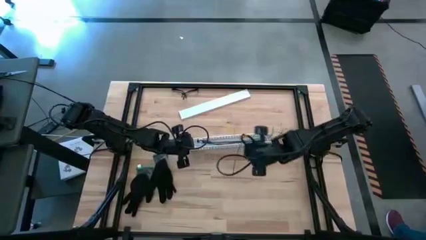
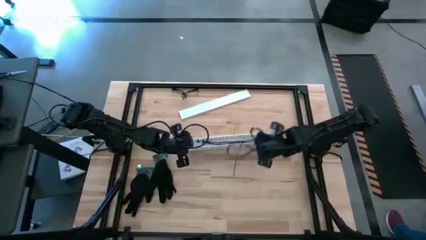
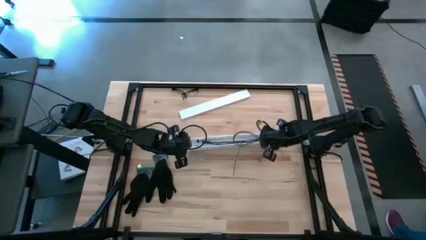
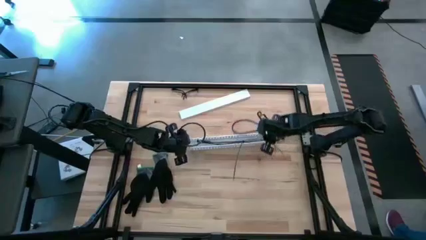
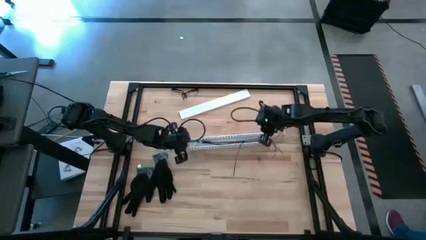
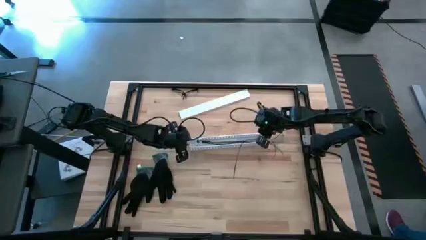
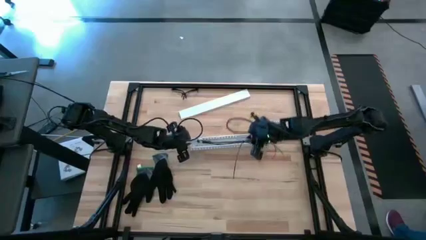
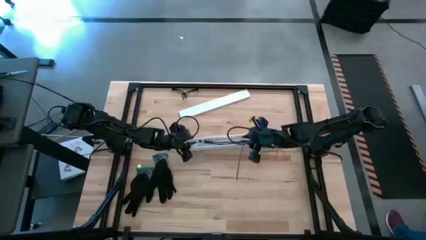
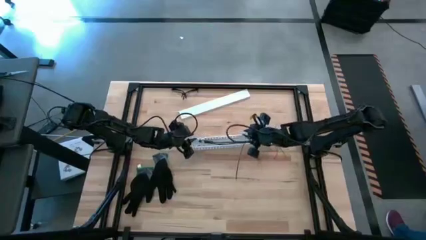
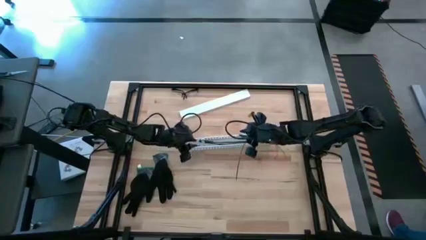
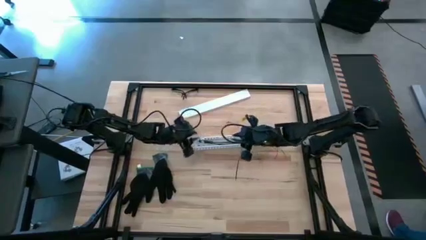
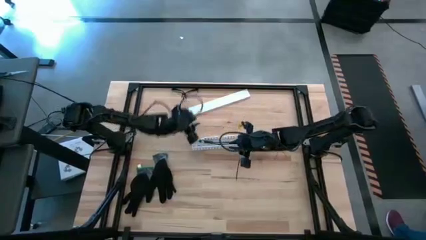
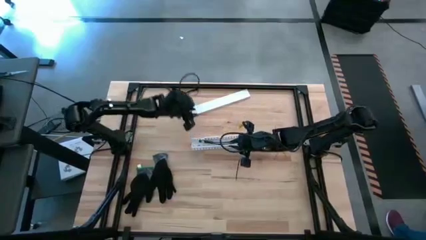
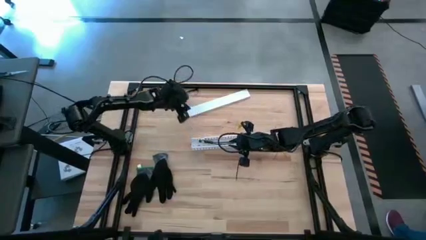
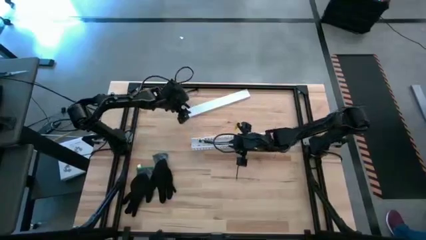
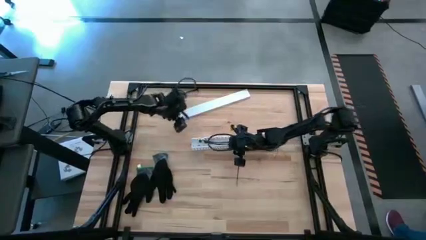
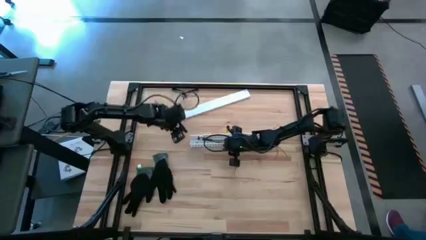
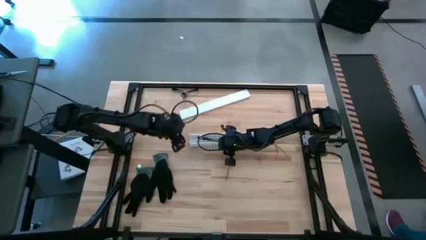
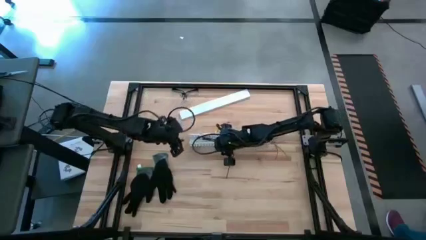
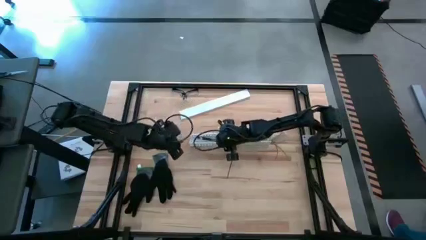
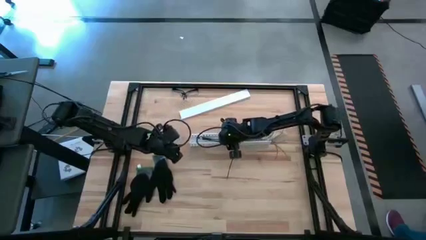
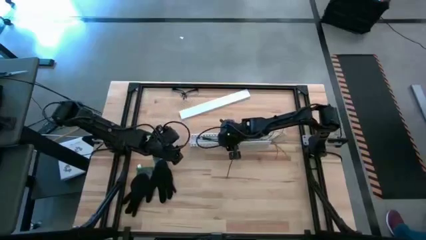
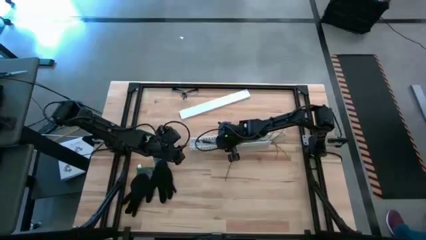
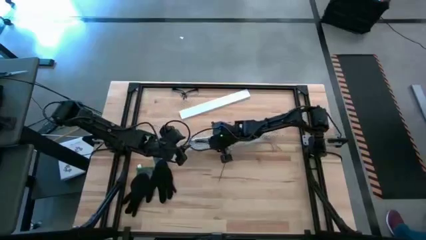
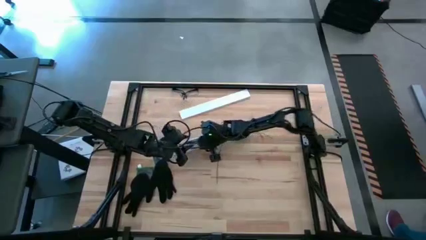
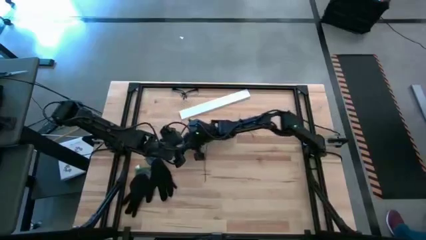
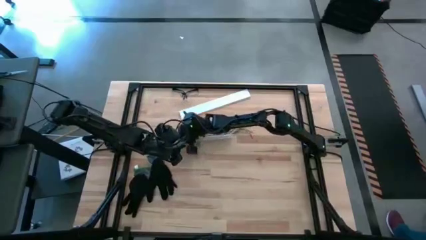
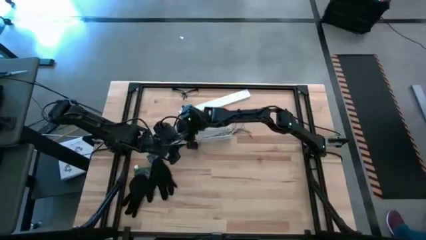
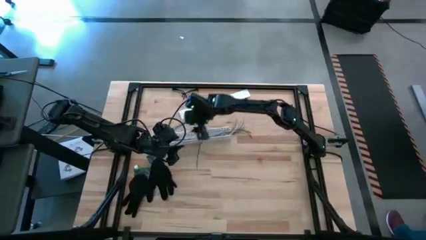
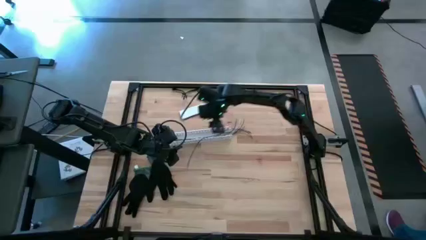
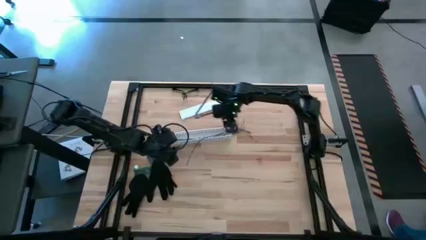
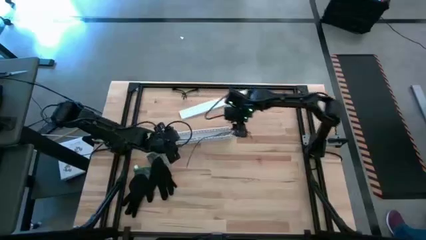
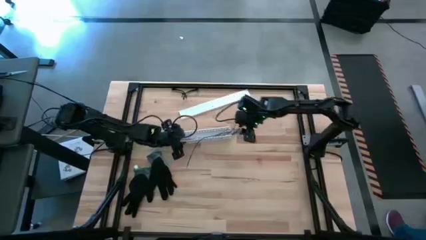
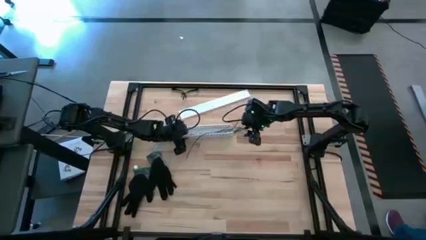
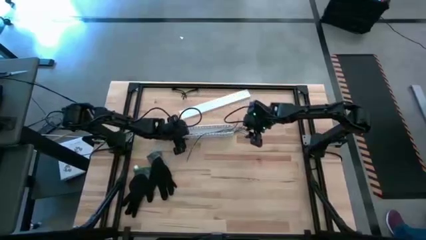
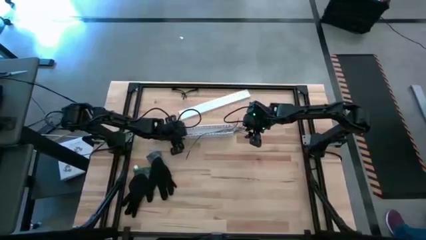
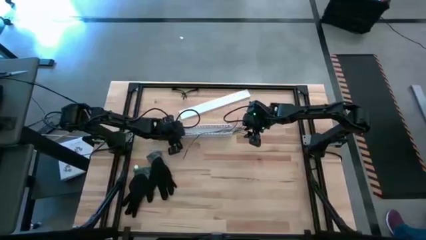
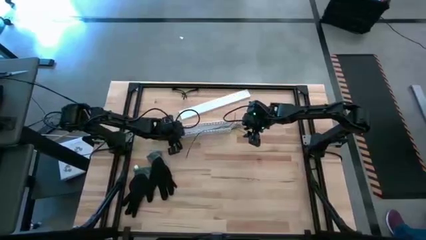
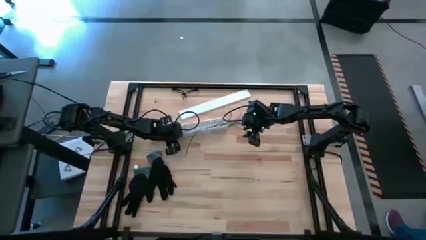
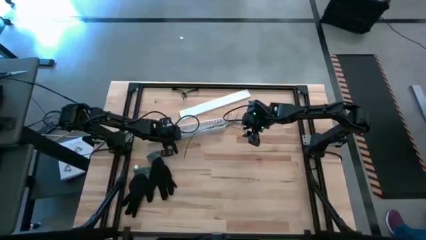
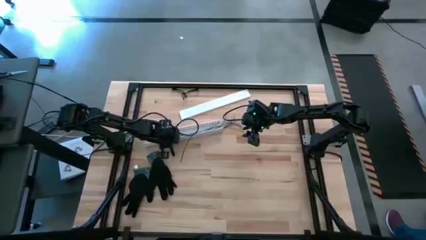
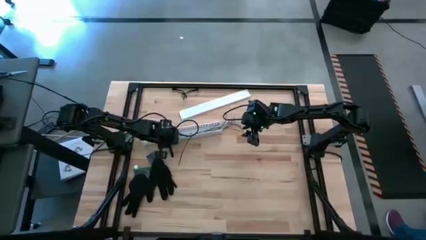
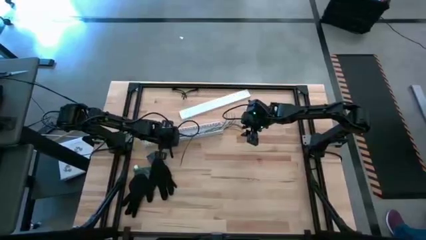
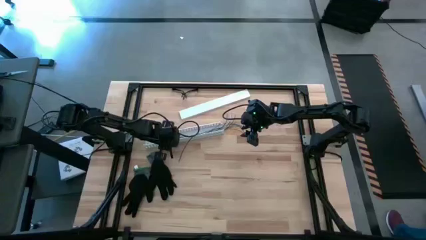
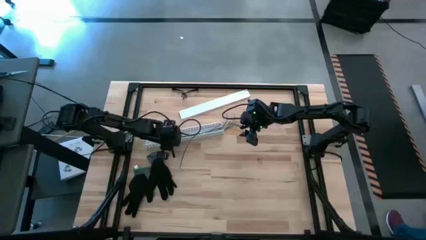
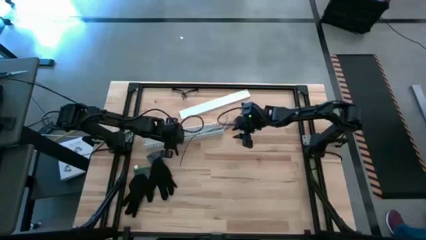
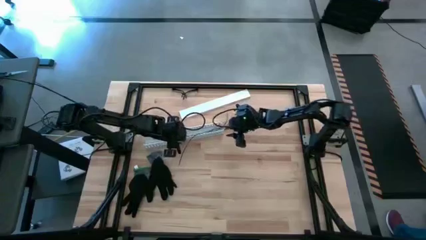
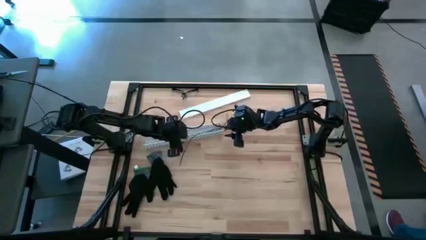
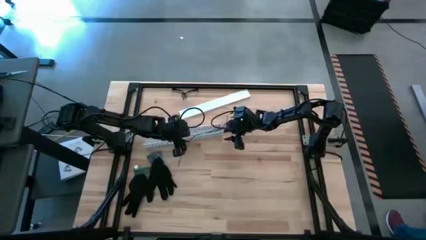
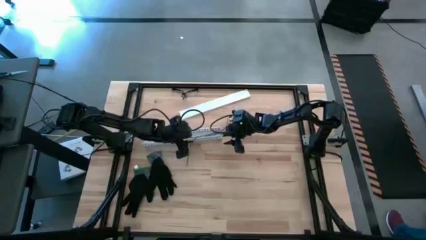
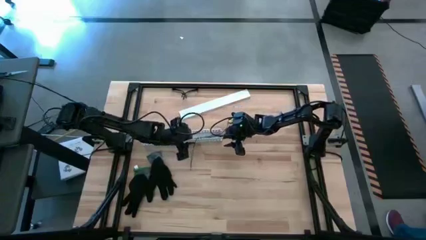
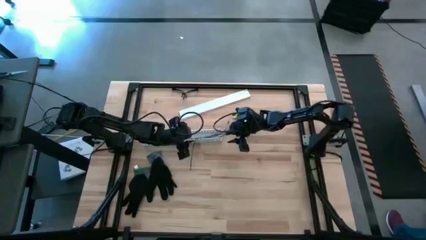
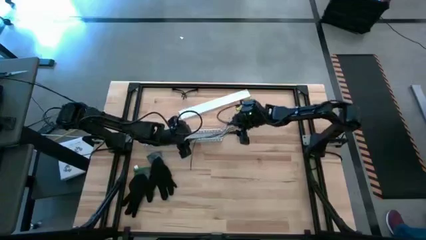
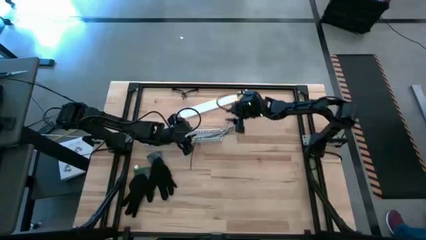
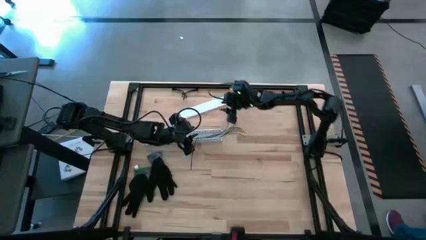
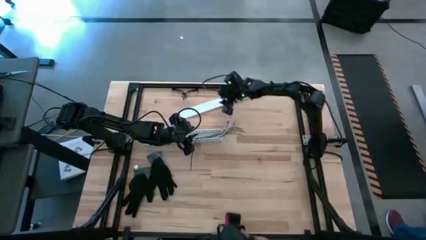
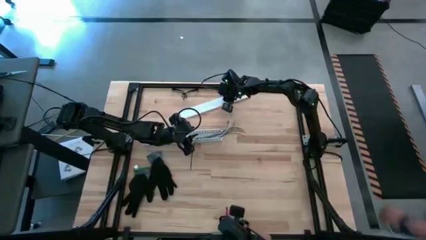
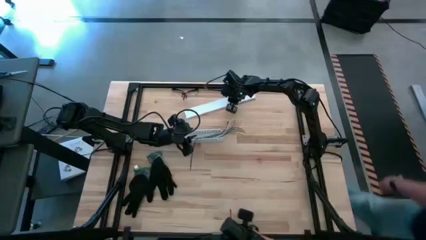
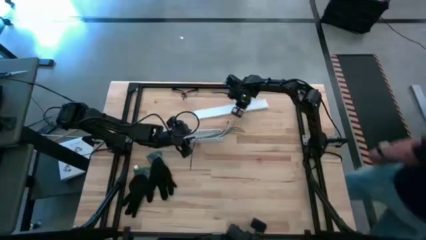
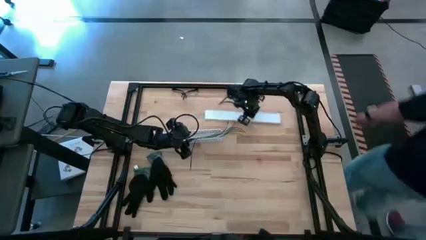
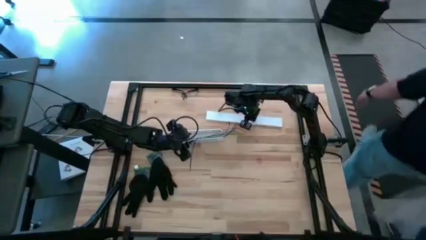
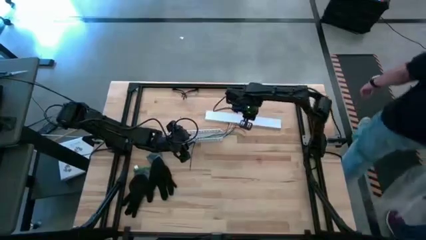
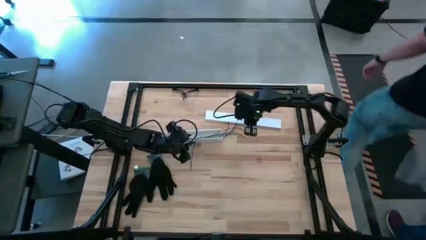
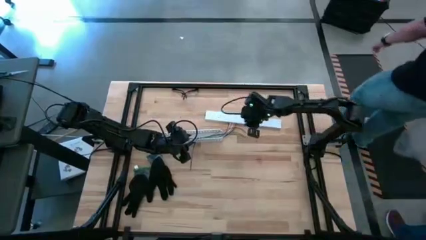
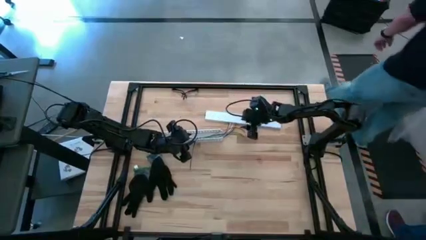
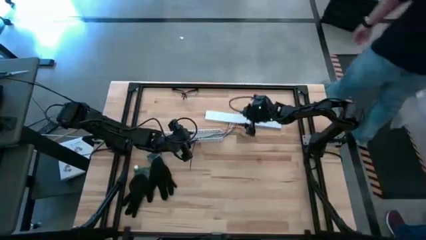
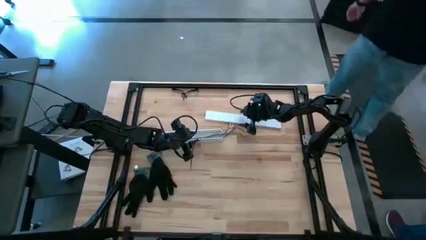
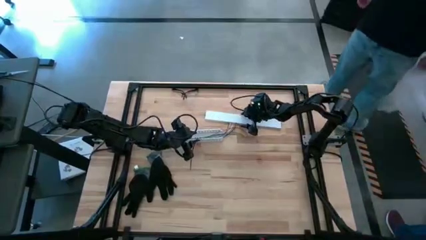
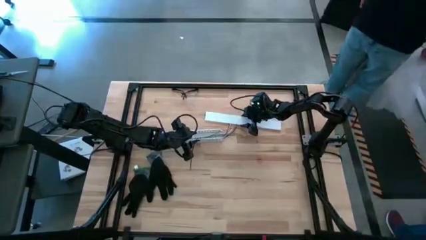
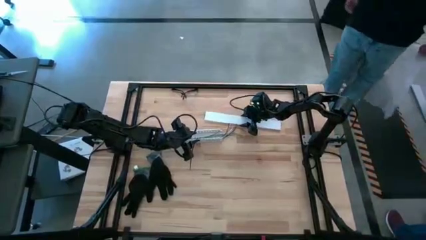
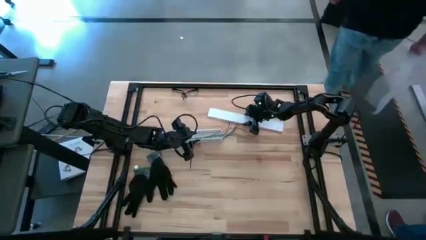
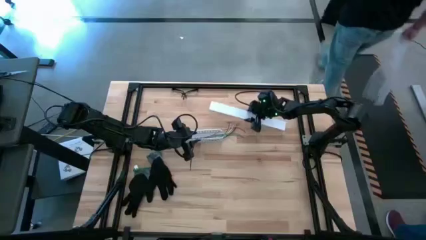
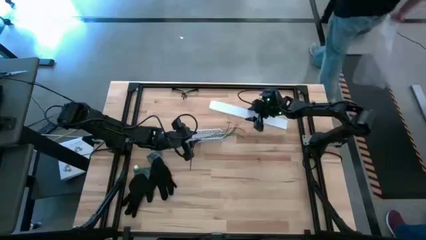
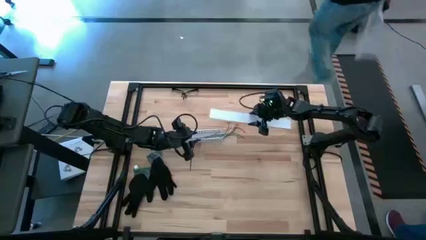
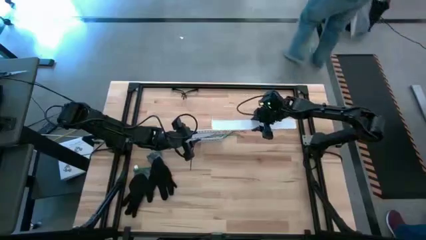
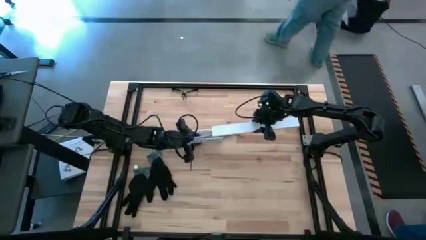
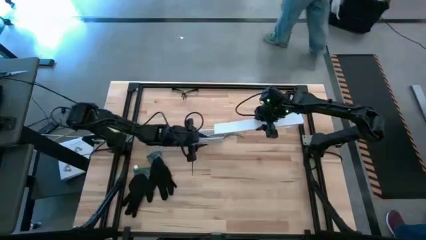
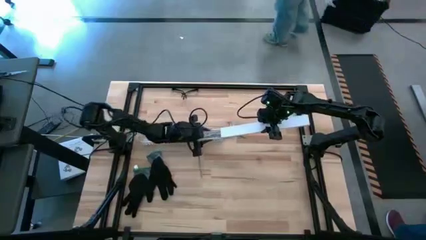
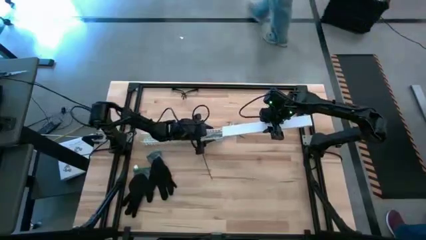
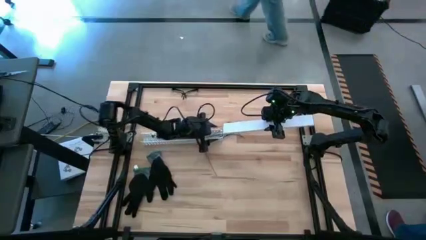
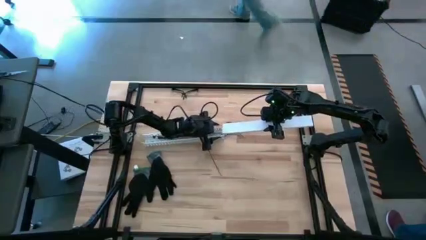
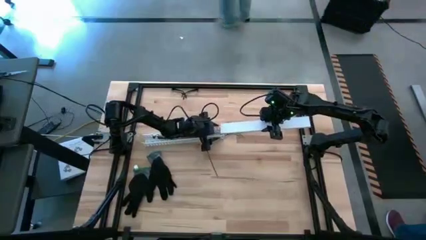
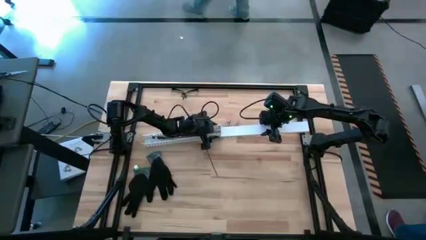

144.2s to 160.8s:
Task: Ziptie cables
Close the white cable duct
